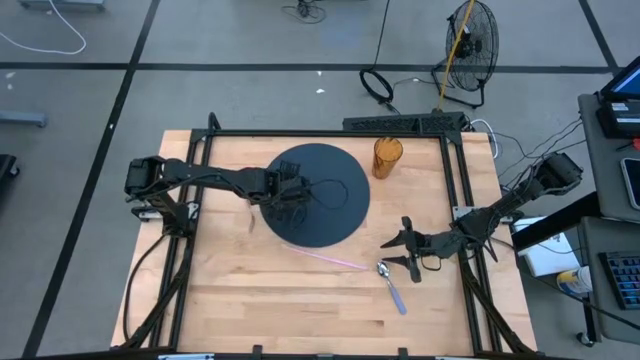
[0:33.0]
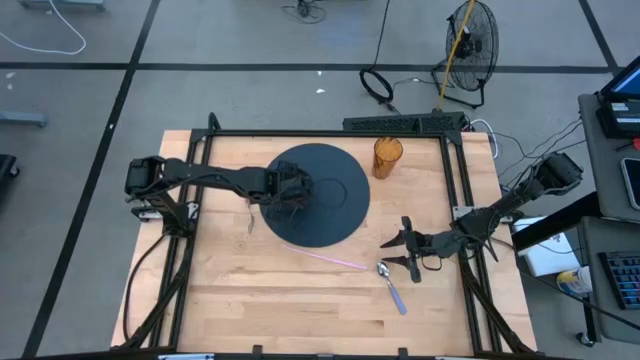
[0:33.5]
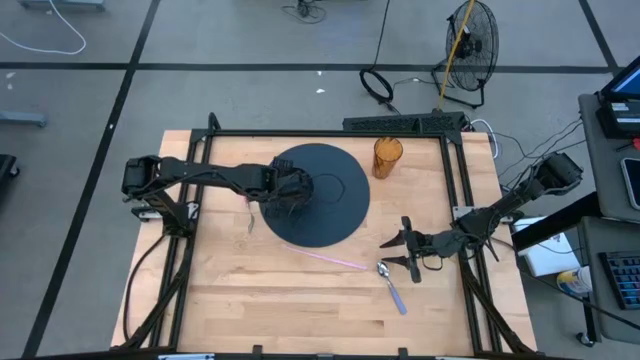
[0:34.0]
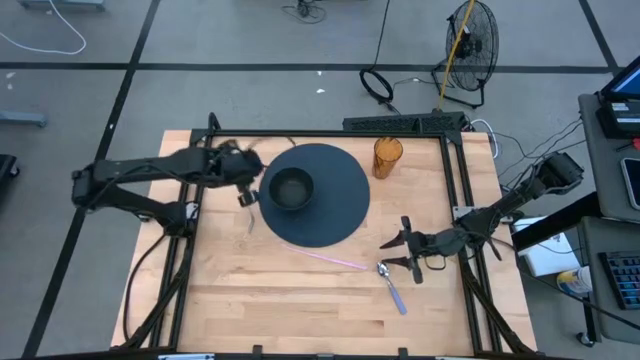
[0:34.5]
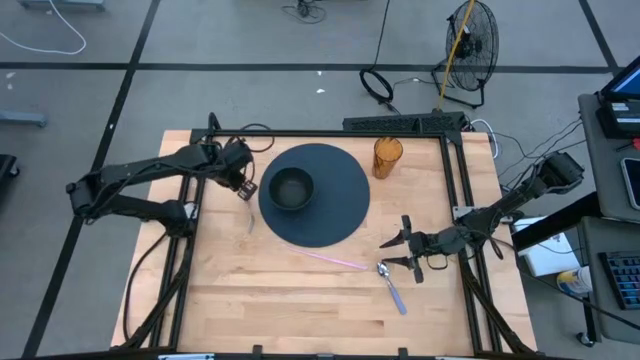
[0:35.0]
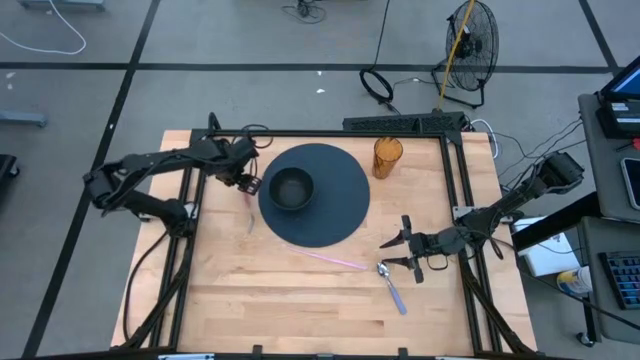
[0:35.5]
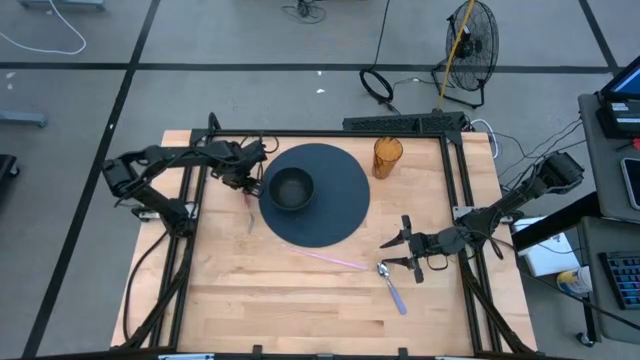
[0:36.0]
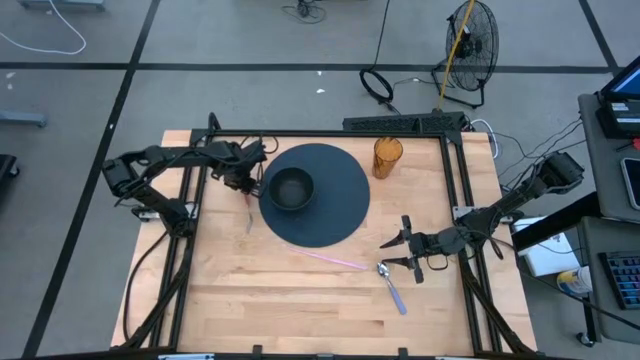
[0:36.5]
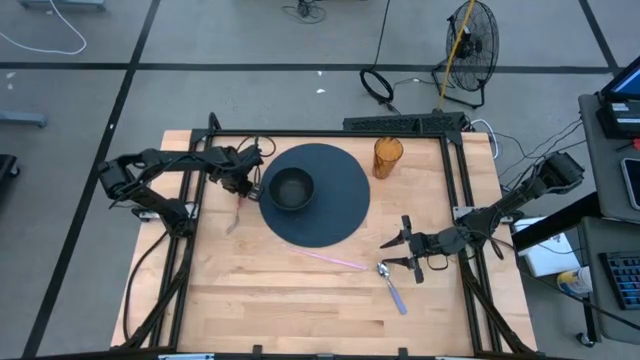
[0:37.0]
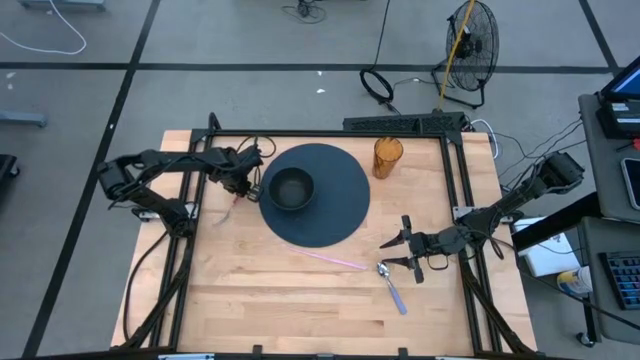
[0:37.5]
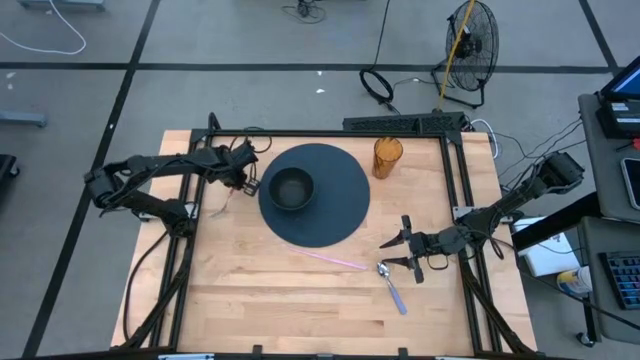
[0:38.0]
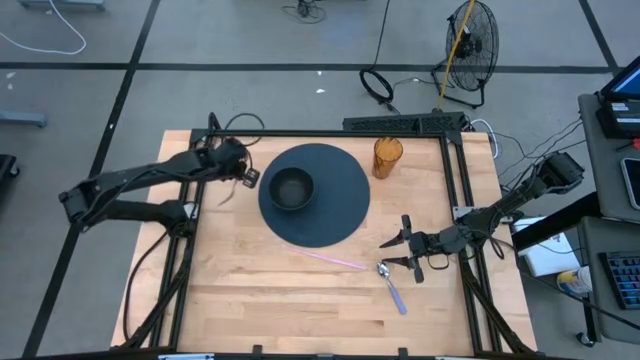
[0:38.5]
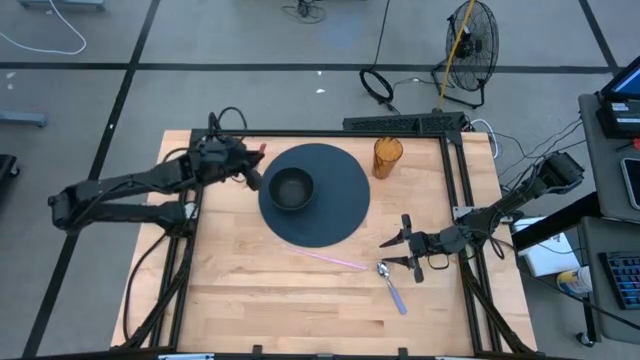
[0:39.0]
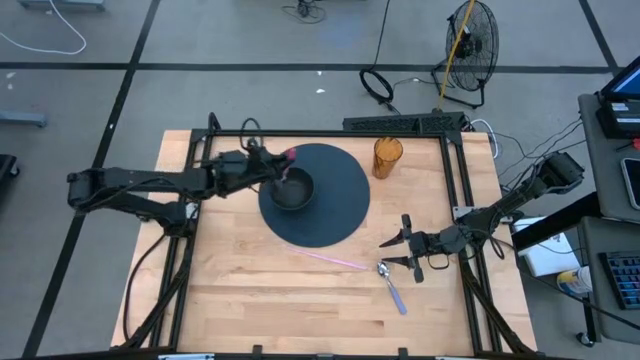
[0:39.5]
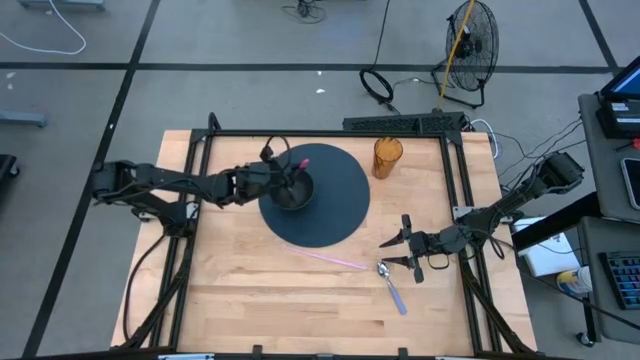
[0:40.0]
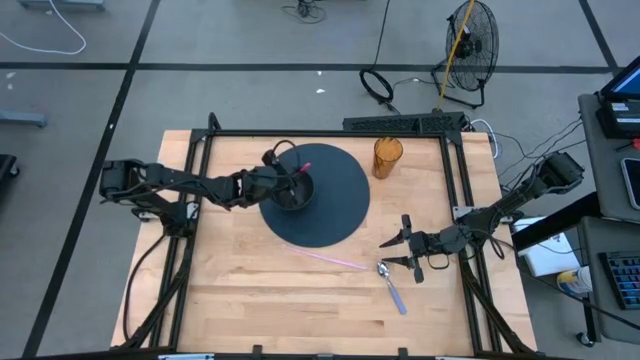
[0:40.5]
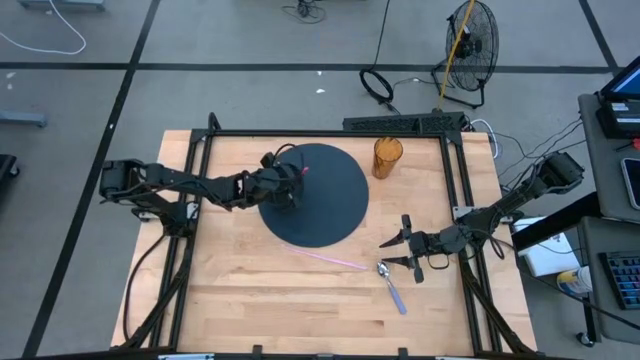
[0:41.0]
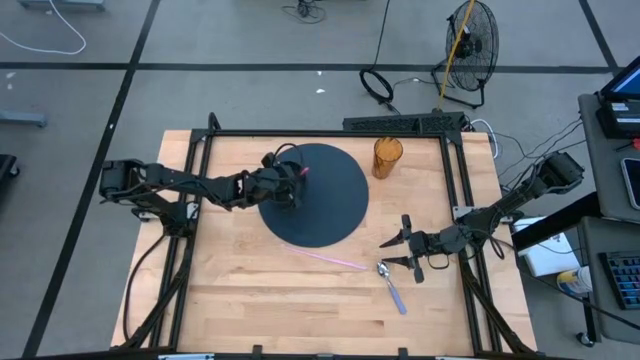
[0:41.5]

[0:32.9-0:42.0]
Task: Pick & Place Utensil
Put the pink fork into the black bowl

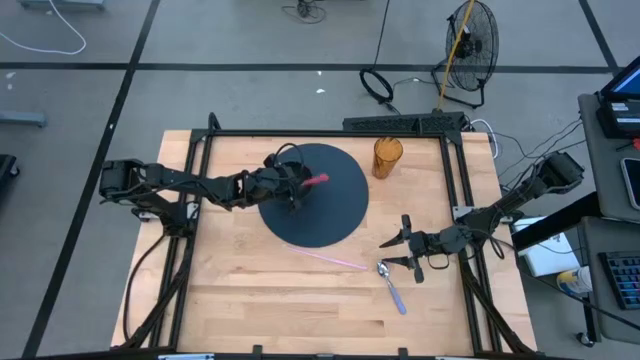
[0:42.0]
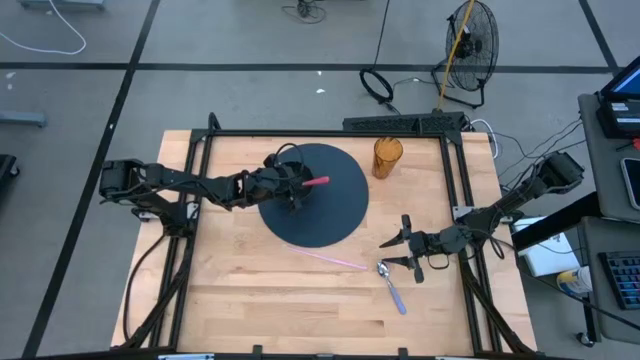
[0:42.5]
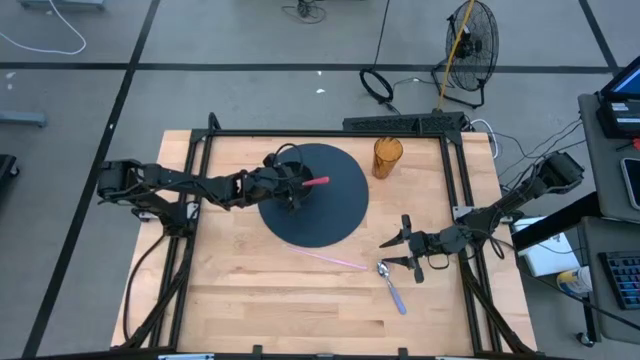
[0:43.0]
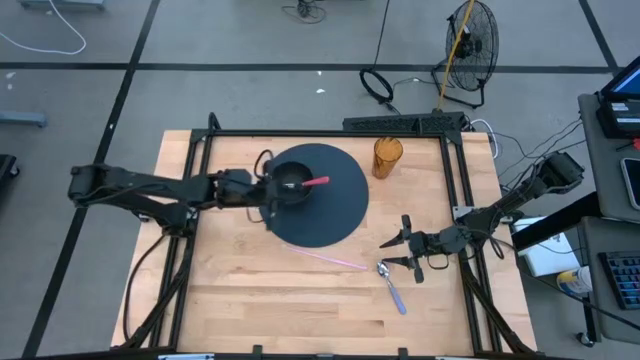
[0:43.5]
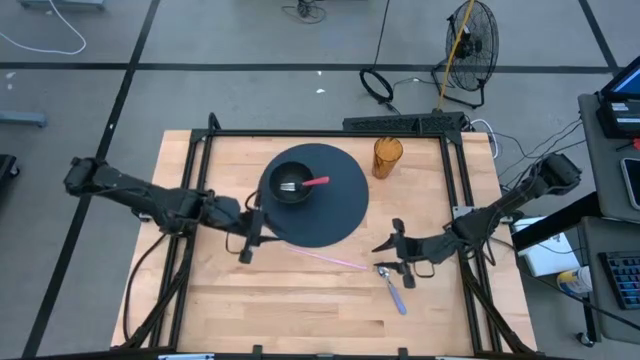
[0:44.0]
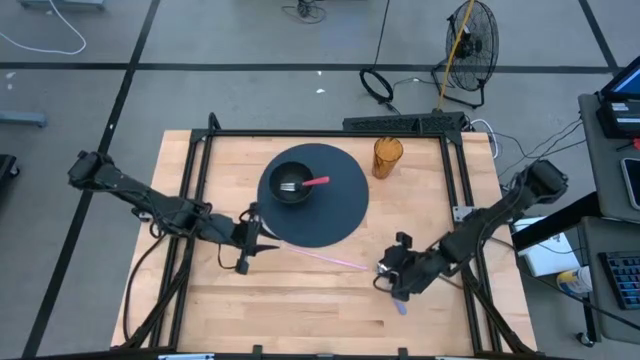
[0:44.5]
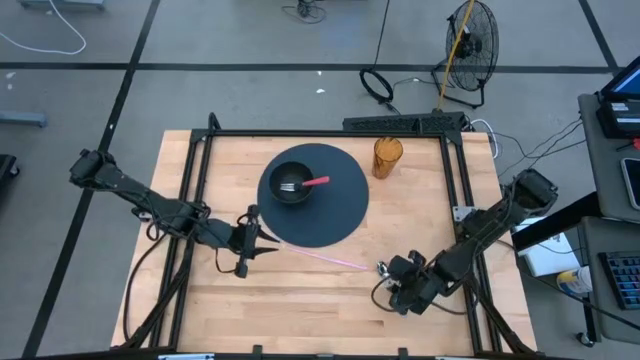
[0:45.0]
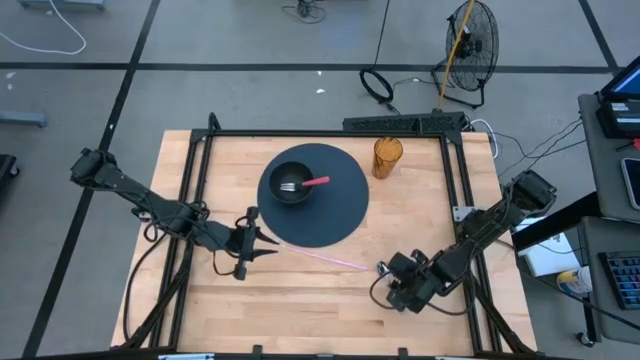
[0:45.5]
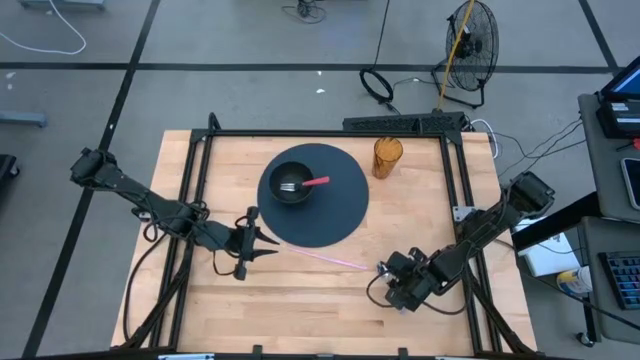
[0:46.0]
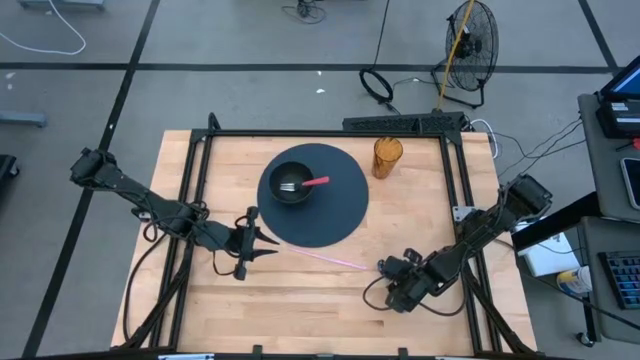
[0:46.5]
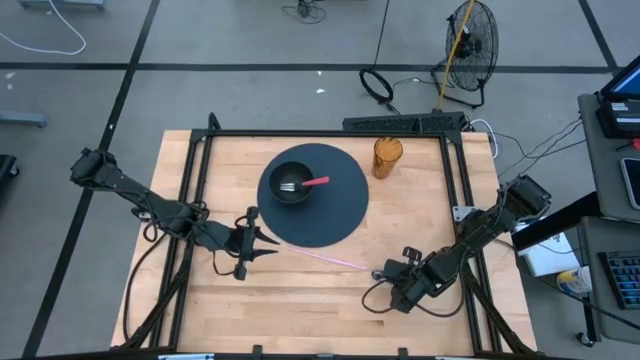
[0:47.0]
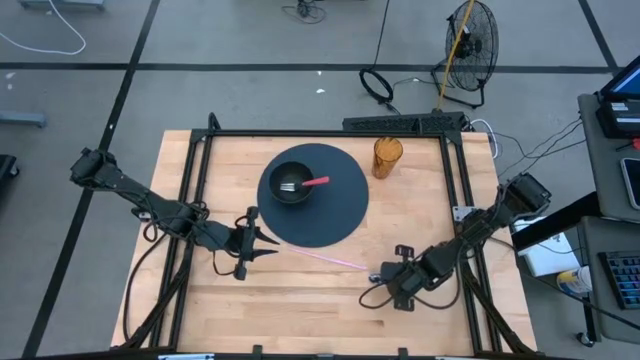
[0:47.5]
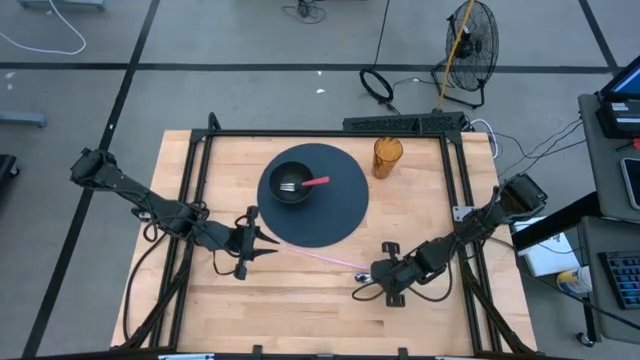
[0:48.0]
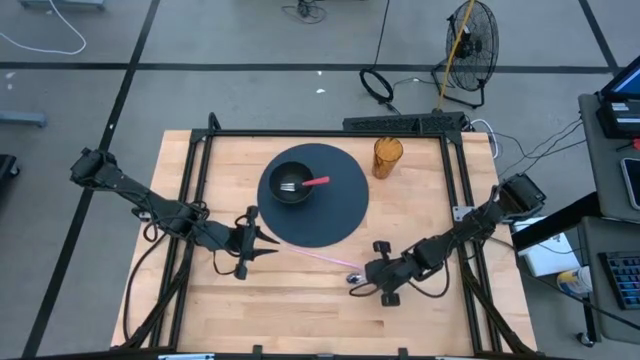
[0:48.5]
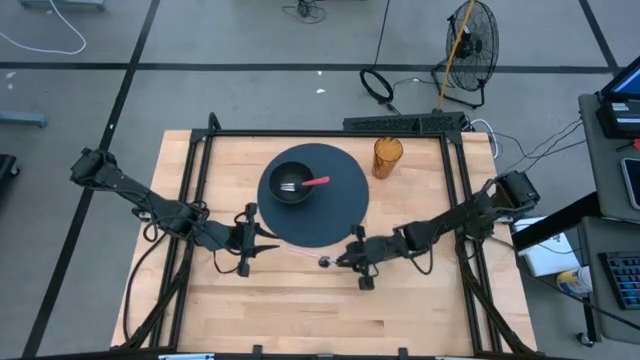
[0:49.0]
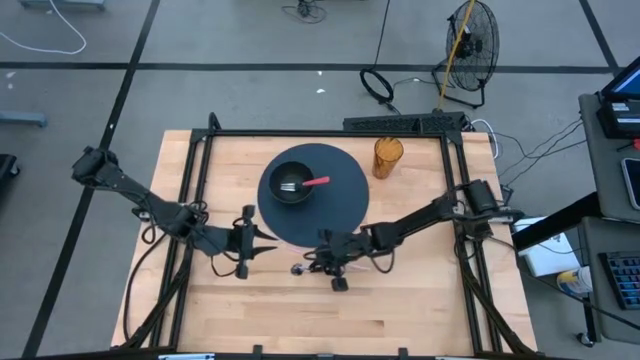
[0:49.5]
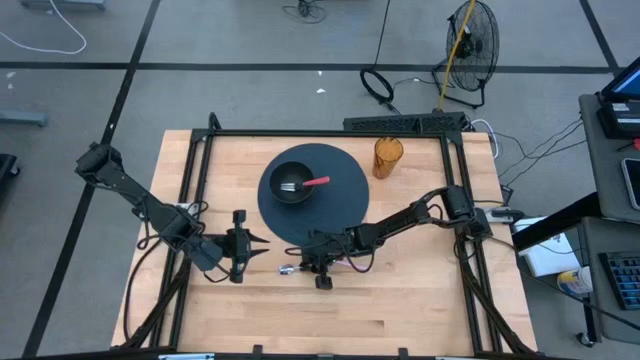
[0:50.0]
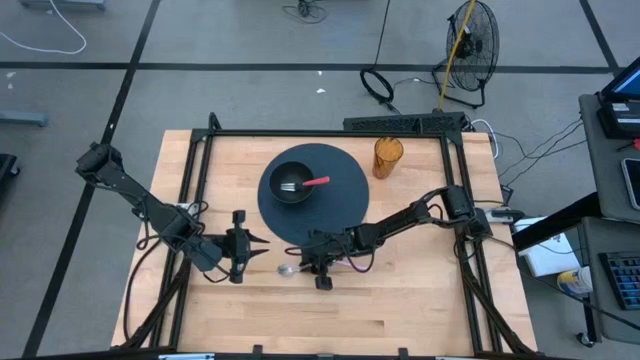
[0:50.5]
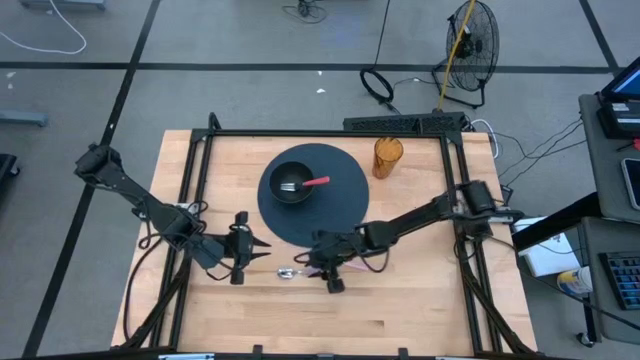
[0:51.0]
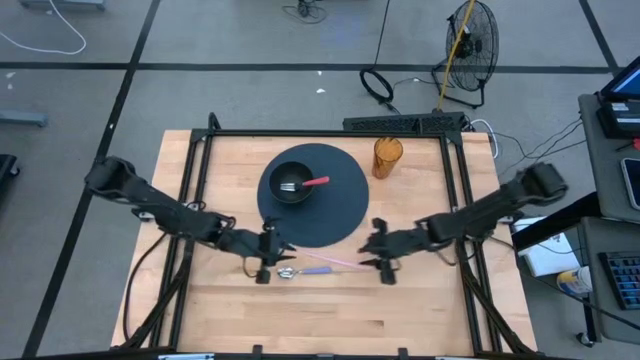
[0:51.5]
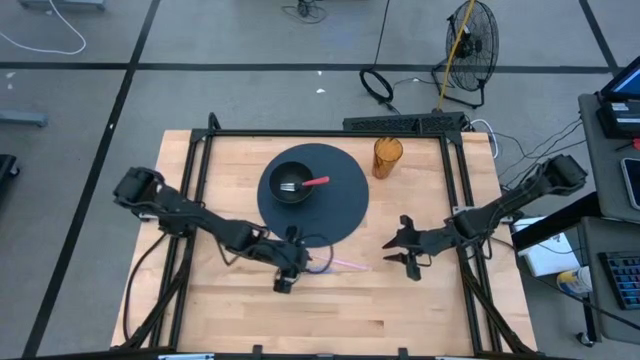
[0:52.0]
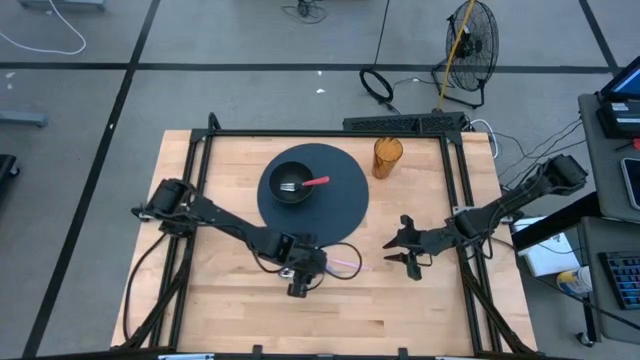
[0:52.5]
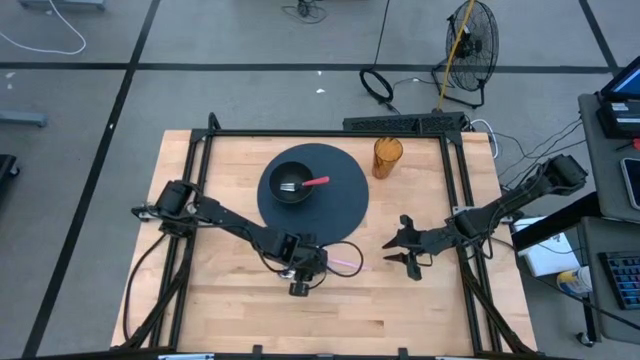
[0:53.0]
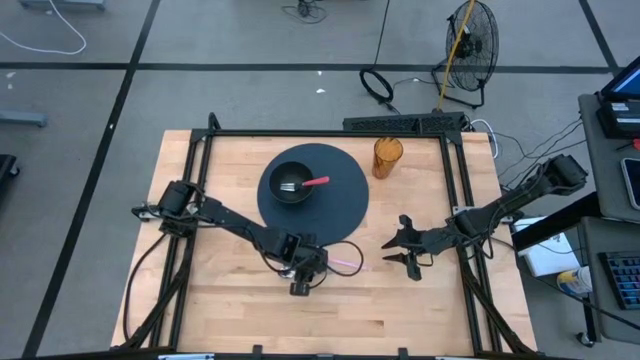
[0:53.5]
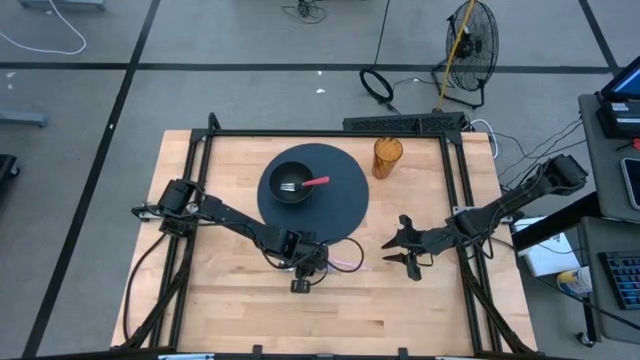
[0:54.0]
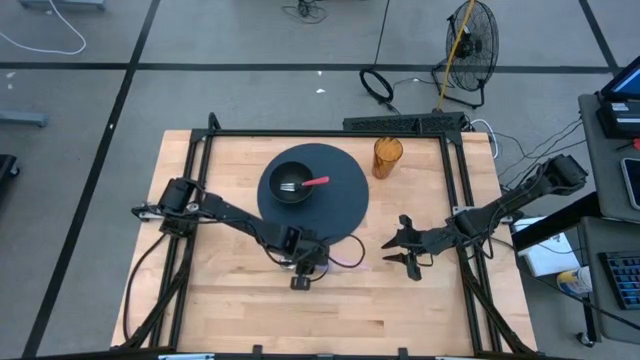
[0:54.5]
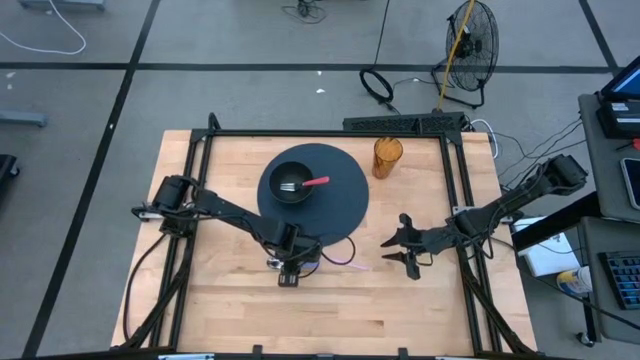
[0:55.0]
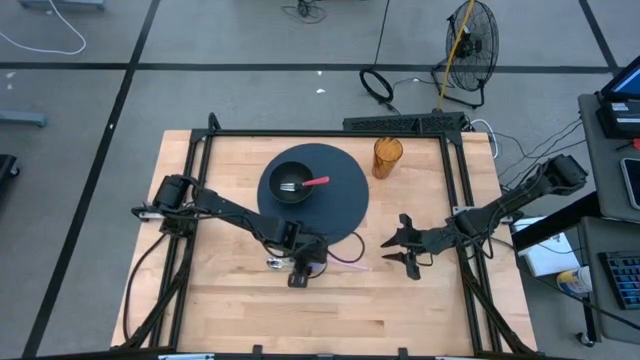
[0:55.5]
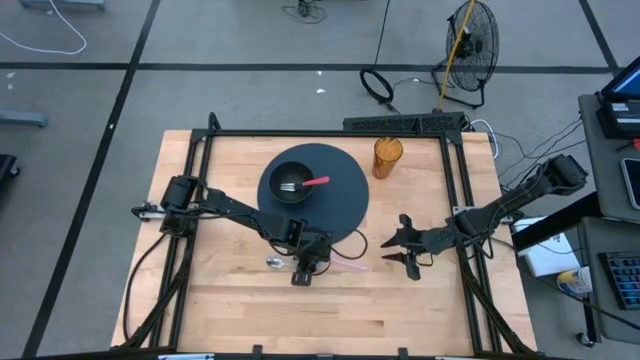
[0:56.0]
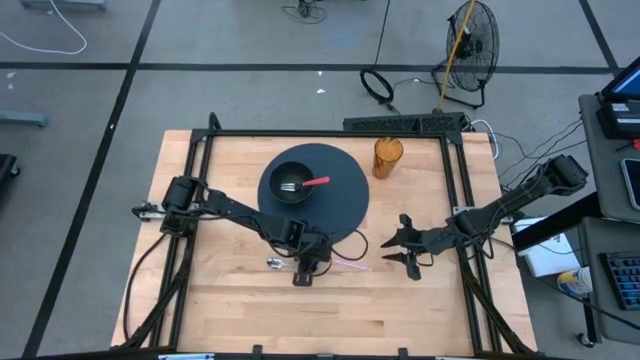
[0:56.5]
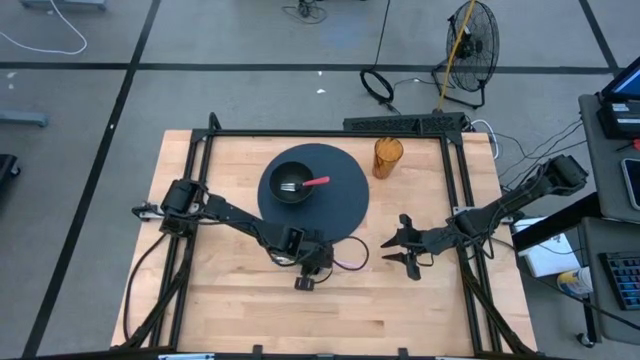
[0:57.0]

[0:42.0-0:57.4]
Put the blue spoon into the bowl
